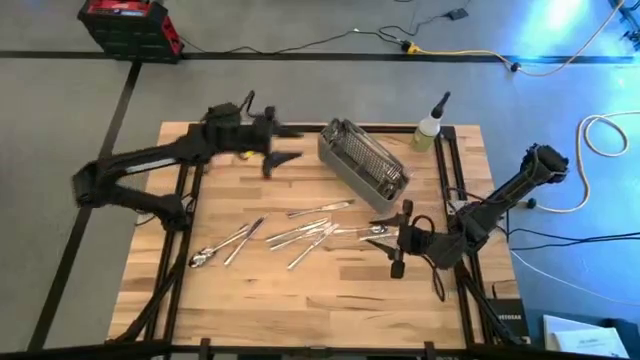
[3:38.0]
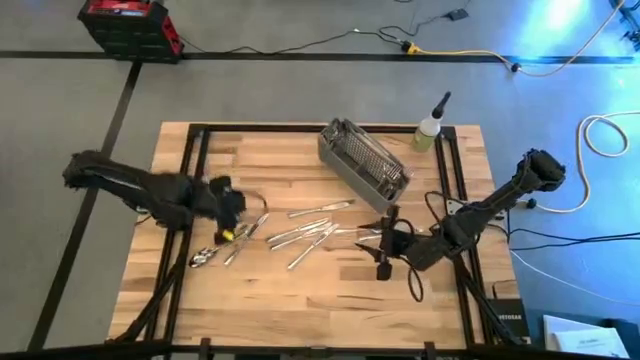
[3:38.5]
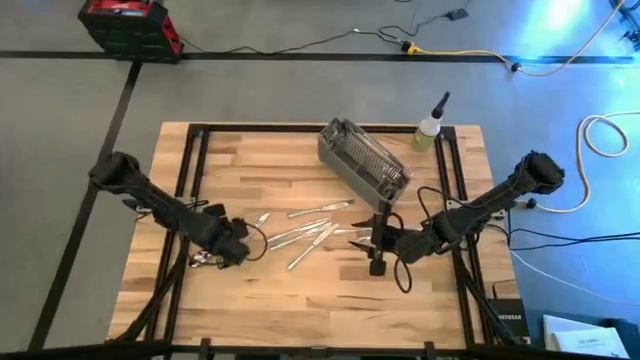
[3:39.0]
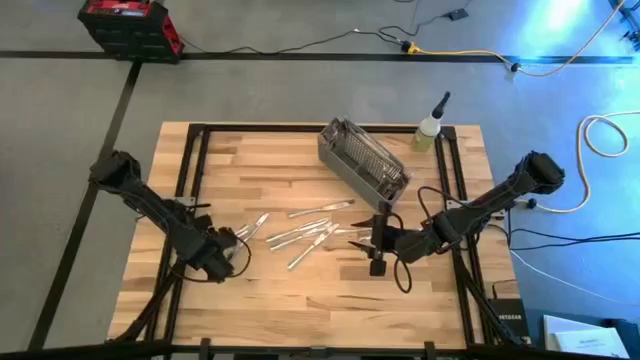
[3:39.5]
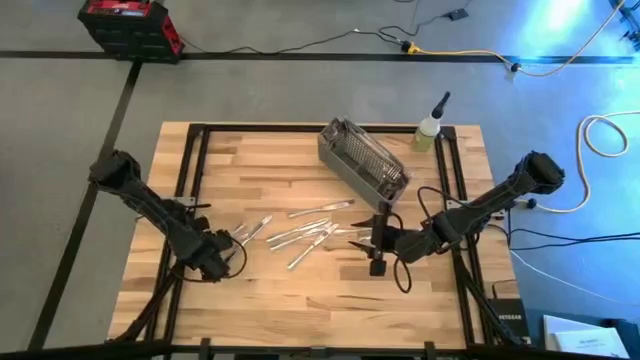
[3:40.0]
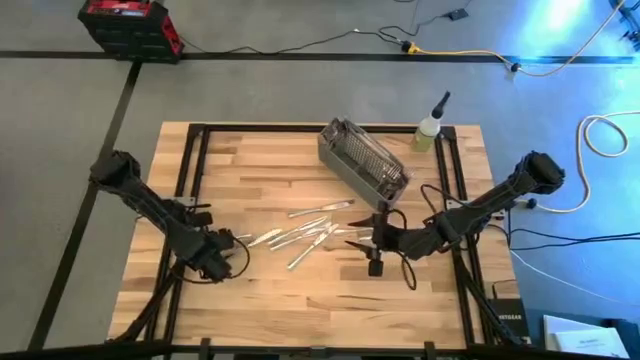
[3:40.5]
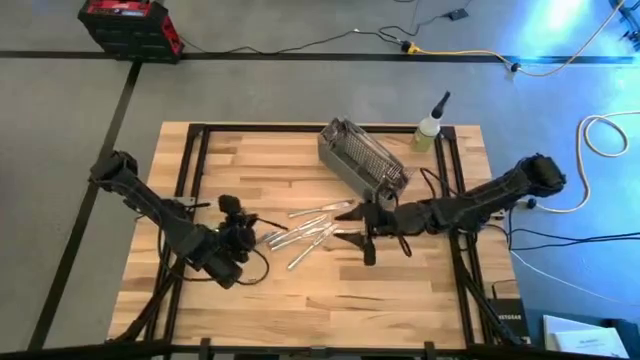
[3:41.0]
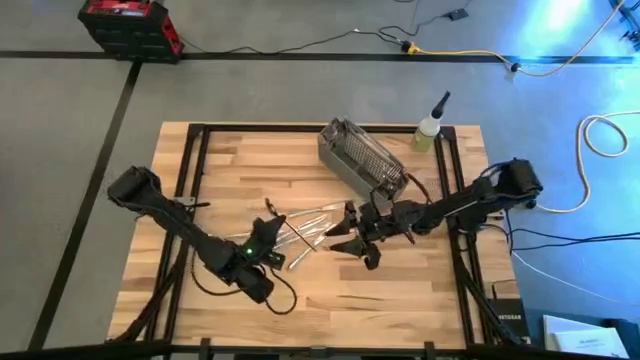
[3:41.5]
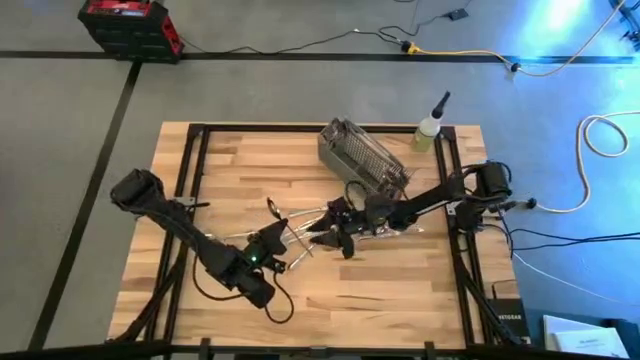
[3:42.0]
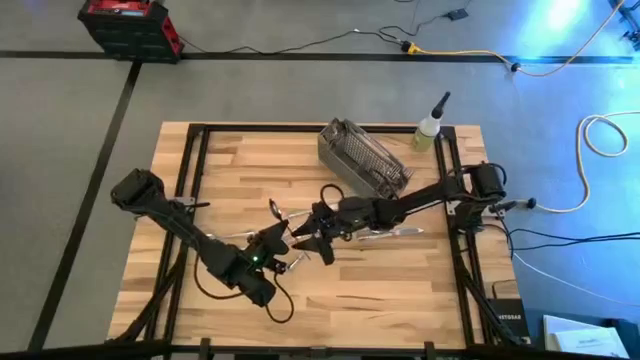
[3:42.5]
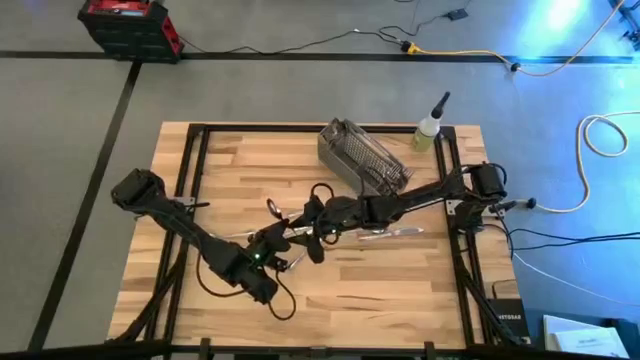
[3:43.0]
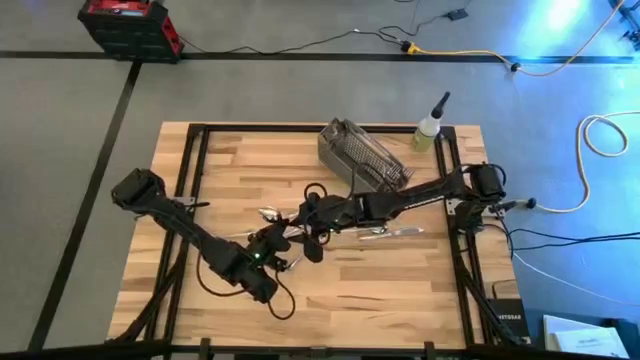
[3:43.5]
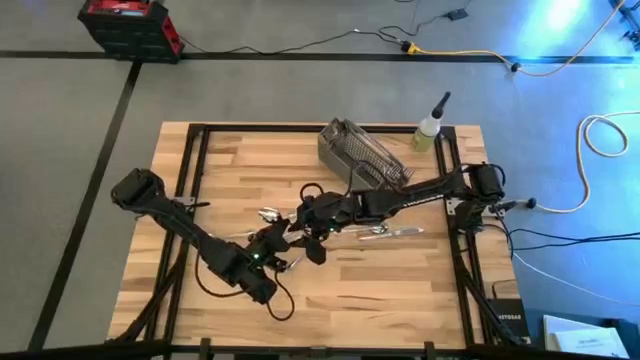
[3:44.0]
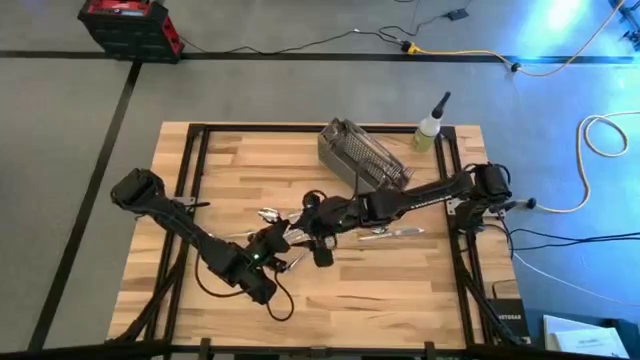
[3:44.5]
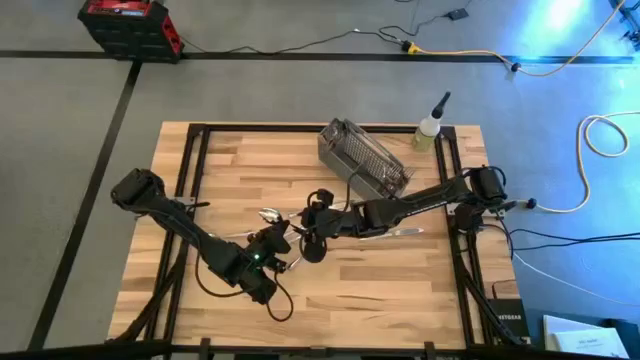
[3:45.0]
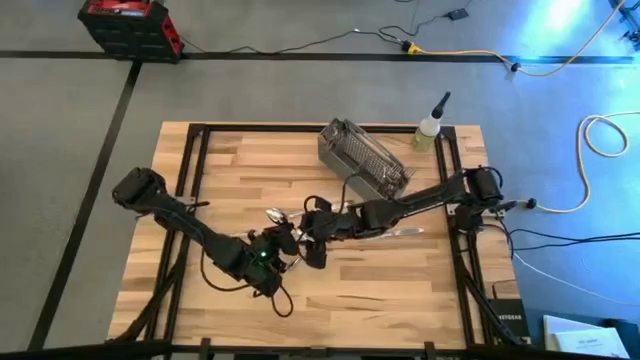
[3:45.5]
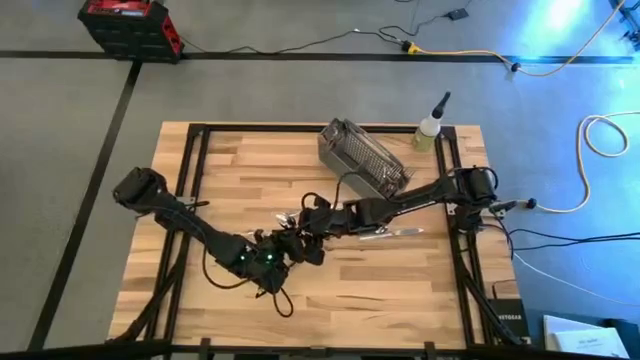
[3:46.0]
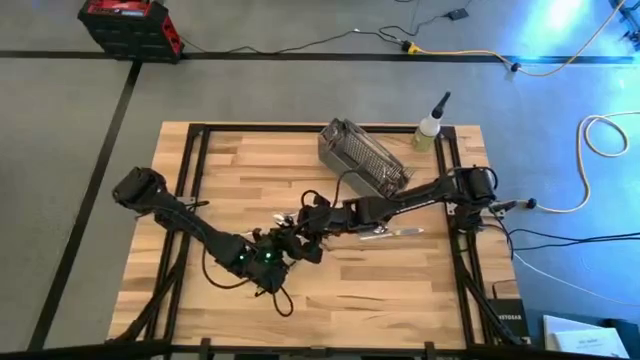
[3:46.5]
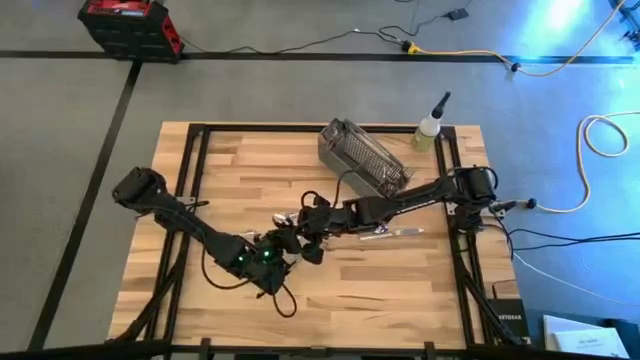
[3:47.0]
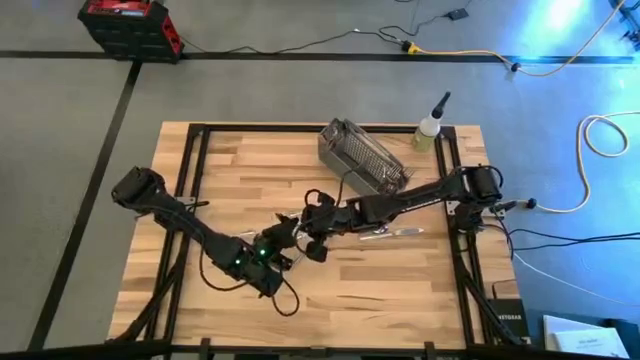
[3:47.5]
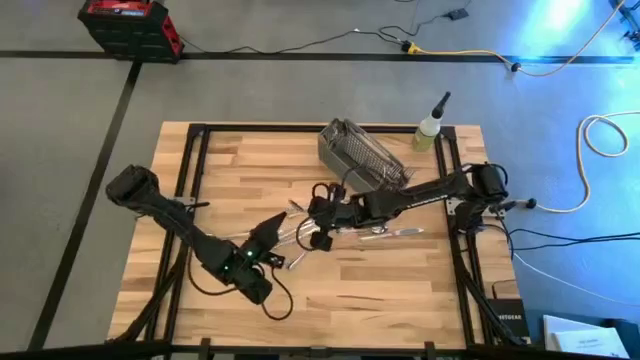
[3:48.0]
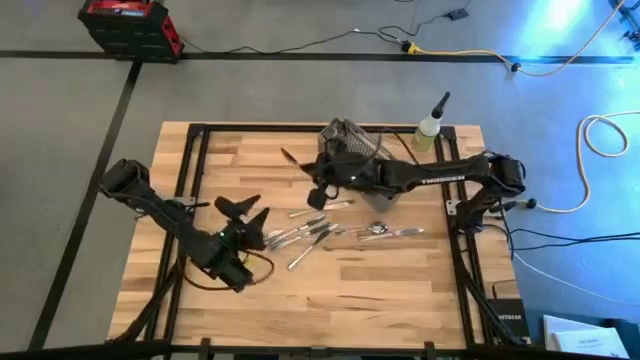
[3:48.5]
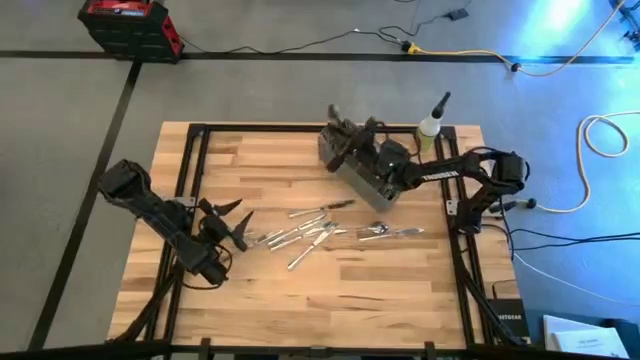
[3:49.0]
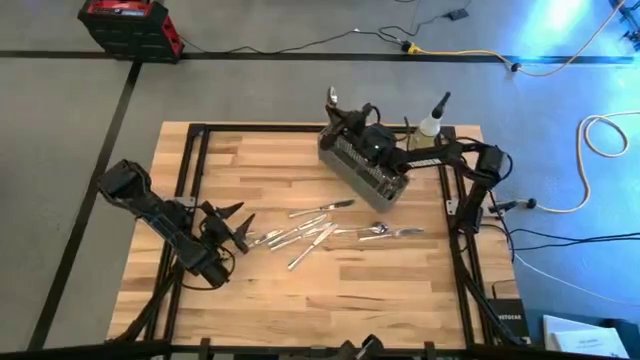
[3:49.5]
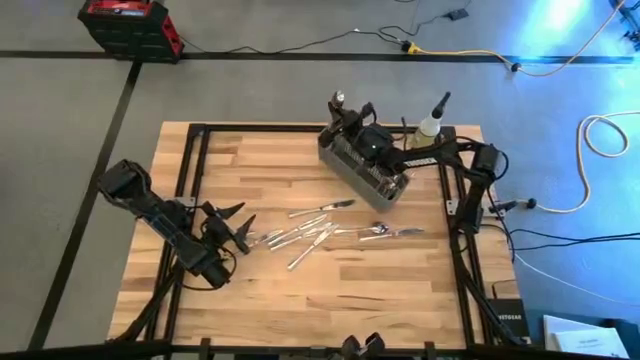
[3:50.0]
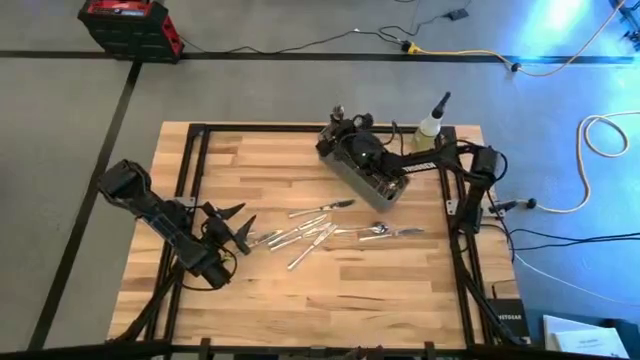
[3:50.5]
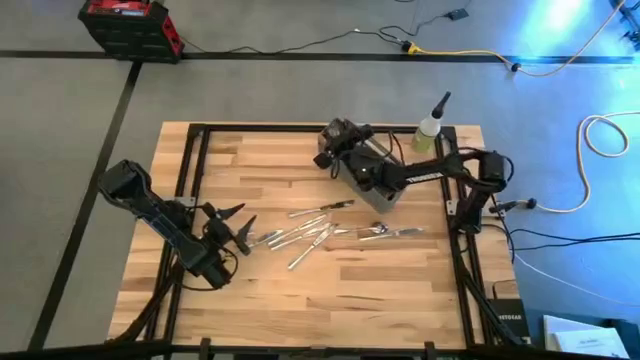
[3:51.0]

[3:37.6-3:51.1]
Task: Sort silverware
Put the silver spoon into the gray silverware organizer

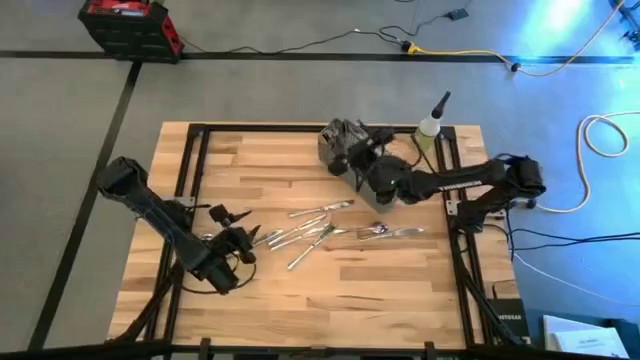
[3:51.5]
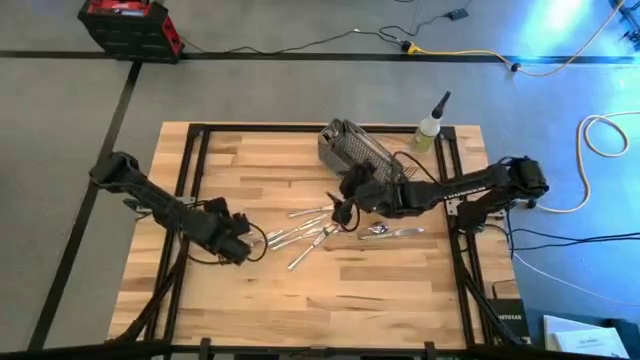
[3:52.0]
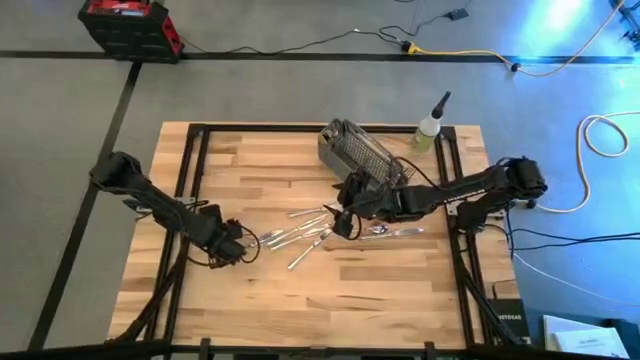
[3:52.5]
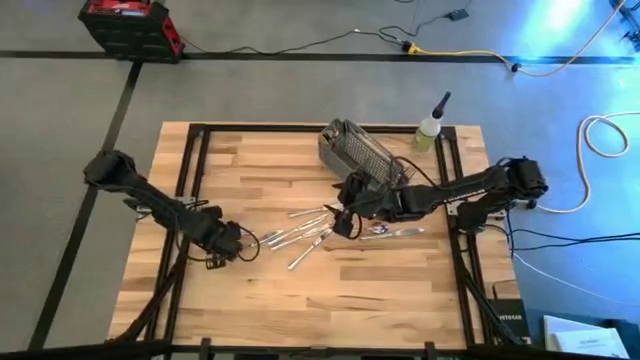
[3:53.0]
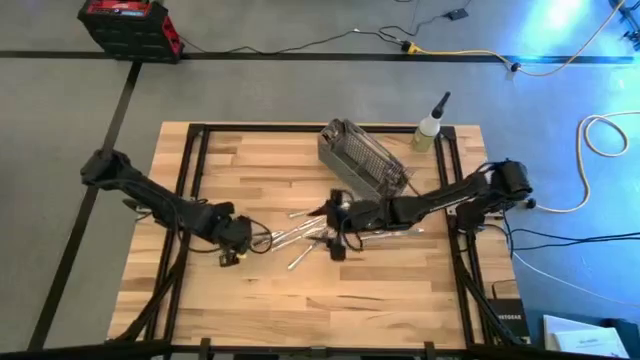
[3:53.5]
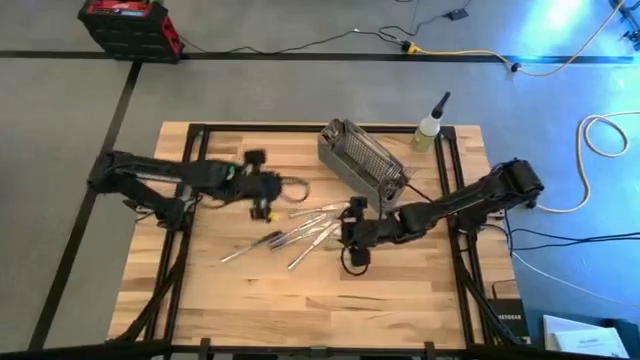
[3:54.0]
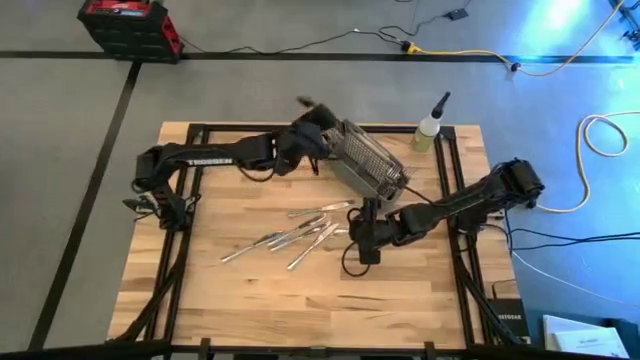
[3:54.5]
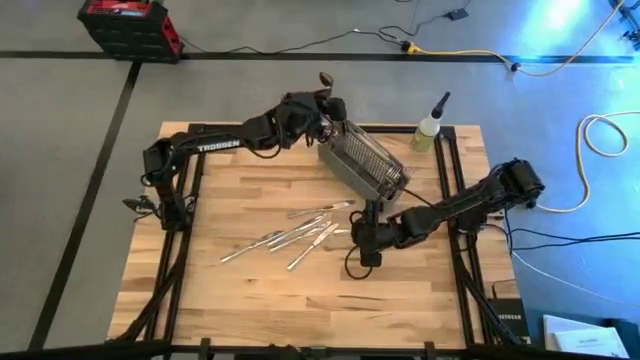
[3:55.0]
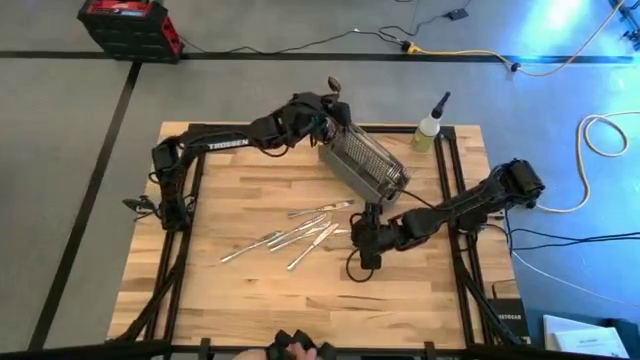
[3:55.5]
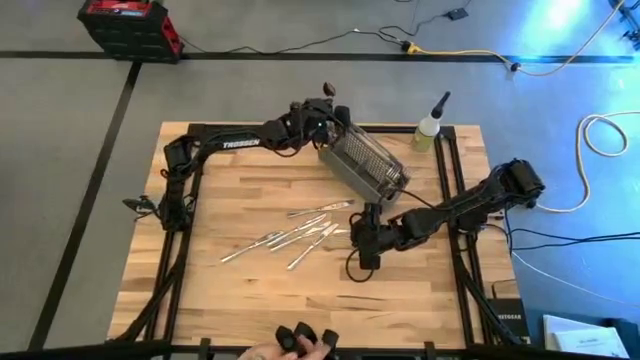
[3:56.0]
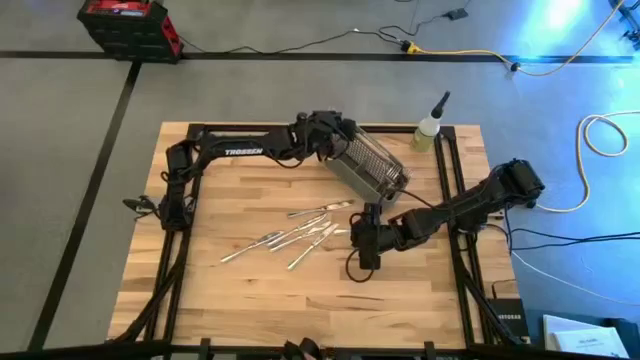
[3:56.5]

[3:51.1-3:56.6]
Put the silver spoon into the gray silverware organizer

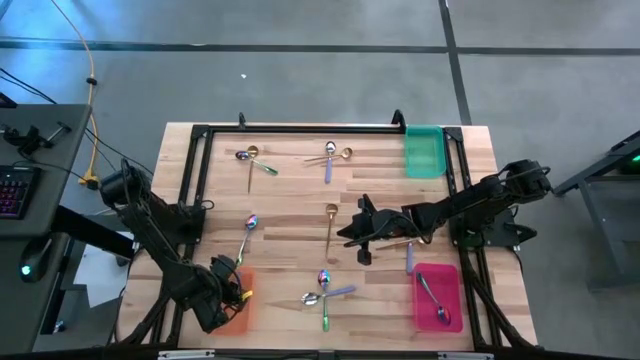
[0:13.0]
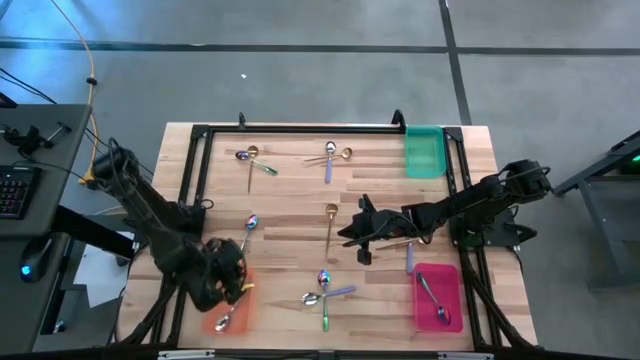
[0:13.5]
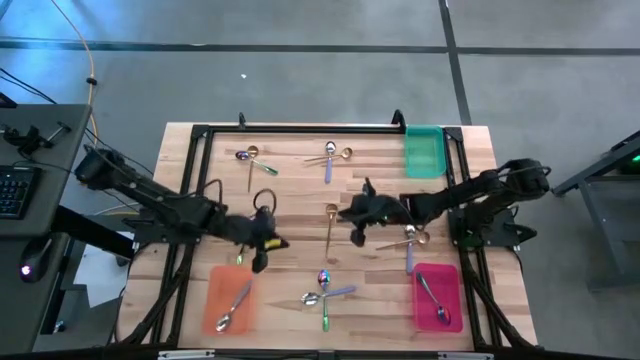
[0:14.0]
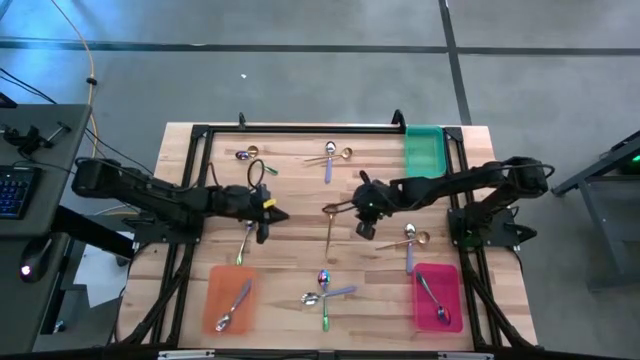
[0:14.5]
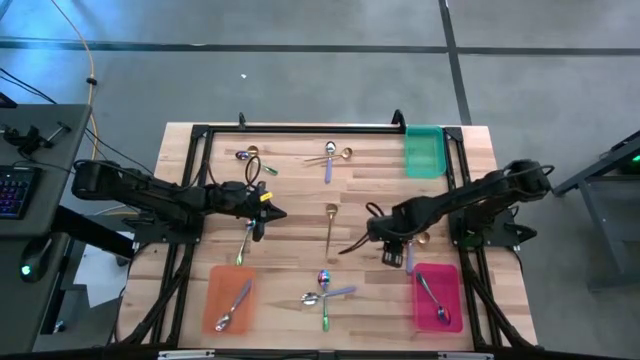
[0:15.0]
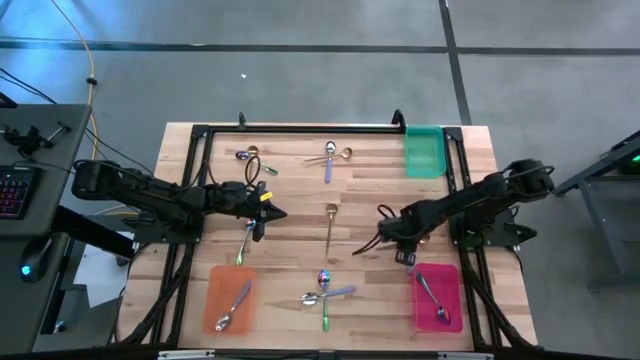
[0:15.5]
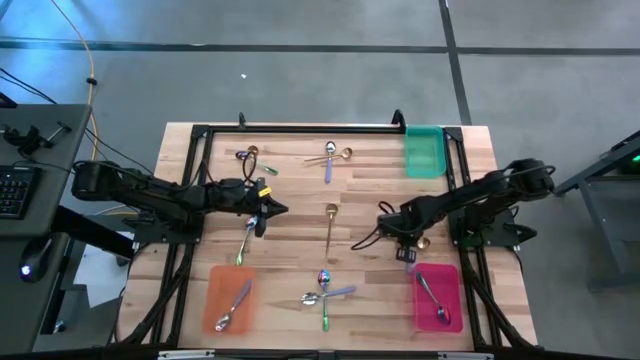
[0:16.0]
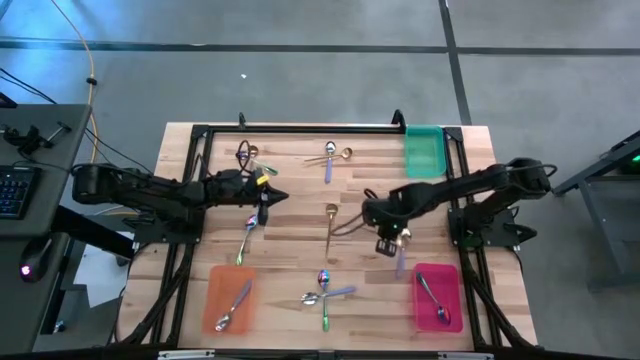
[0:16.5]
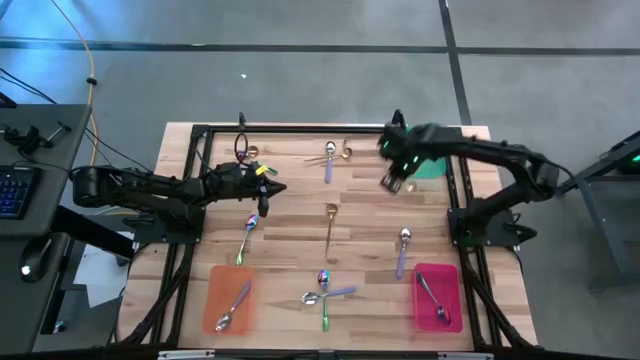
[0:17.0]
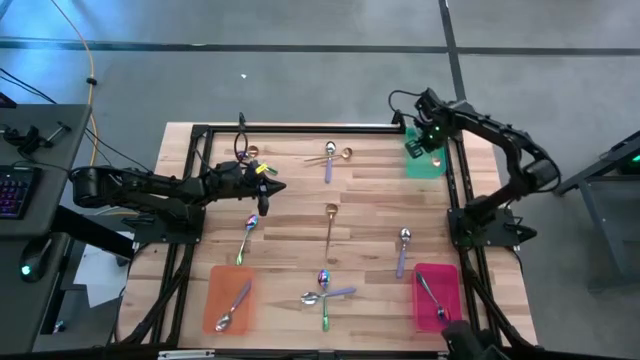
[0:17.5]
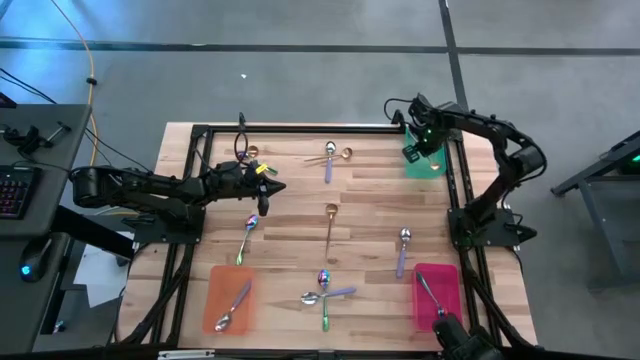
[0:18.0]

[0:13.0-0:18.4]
Task: Sort silverware by color (type)
Put the golden spoon into the green bin
